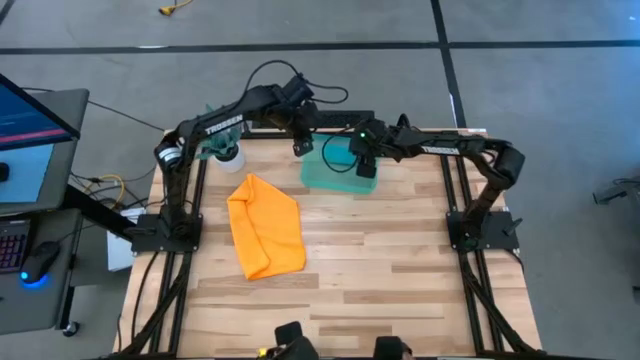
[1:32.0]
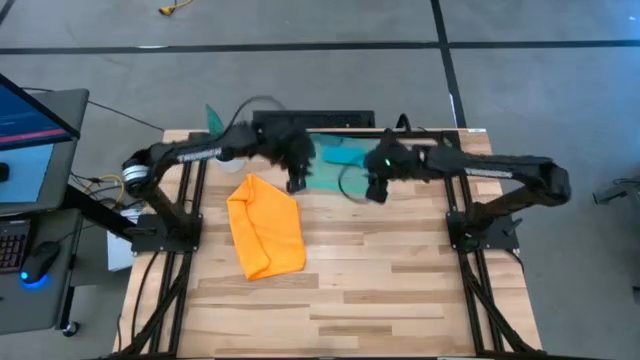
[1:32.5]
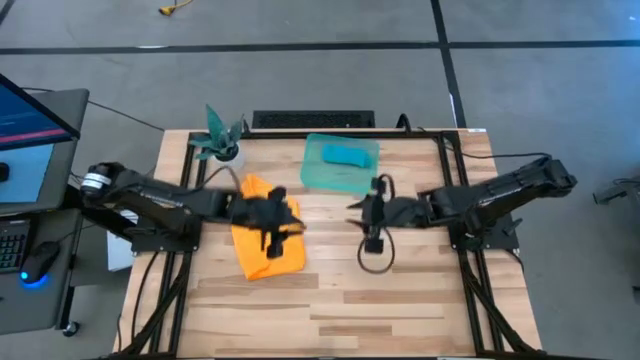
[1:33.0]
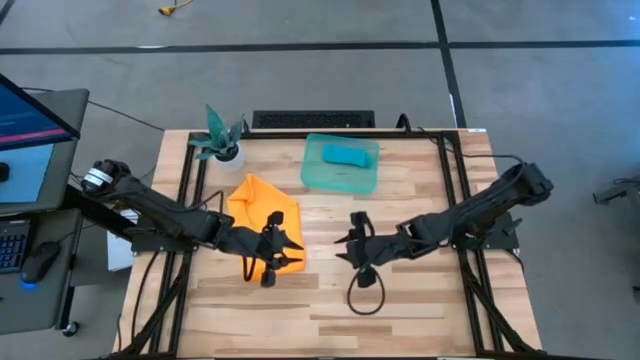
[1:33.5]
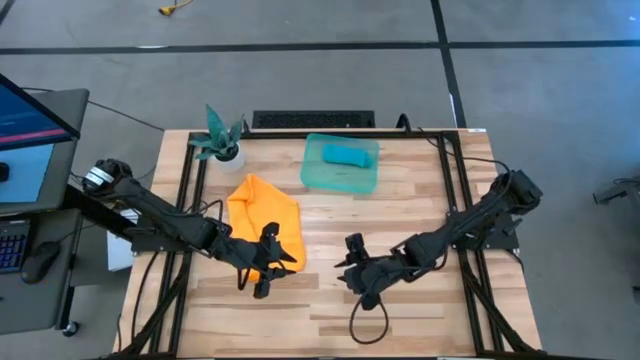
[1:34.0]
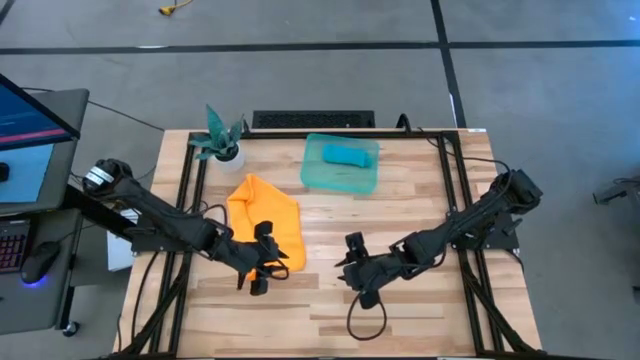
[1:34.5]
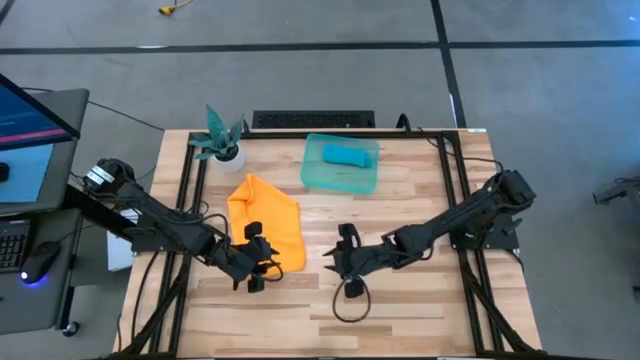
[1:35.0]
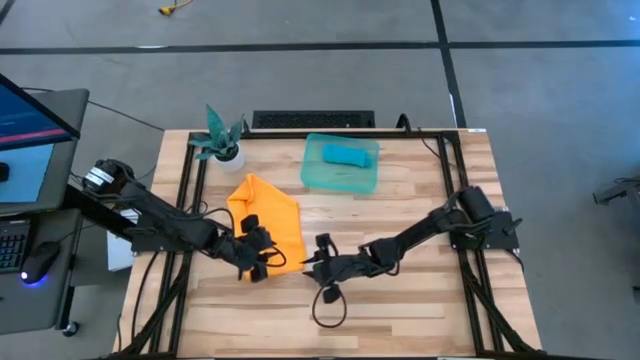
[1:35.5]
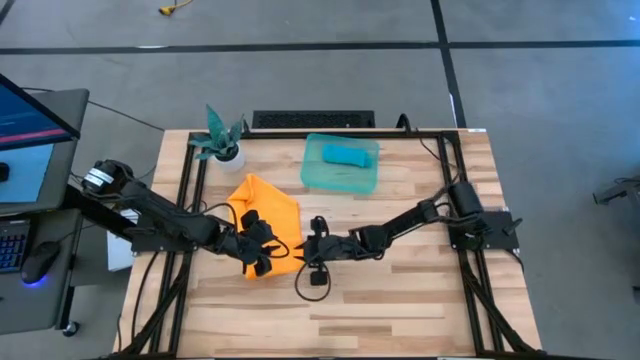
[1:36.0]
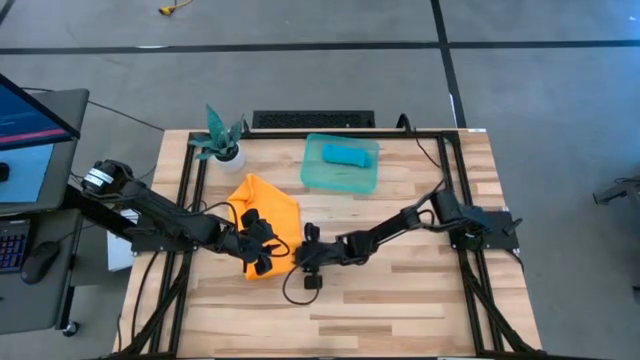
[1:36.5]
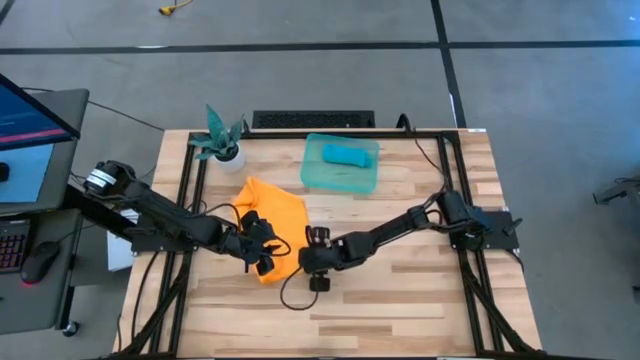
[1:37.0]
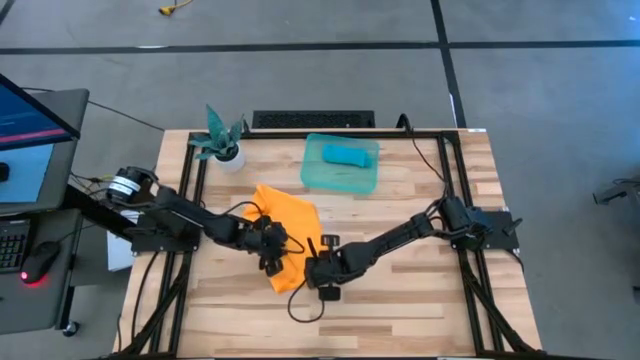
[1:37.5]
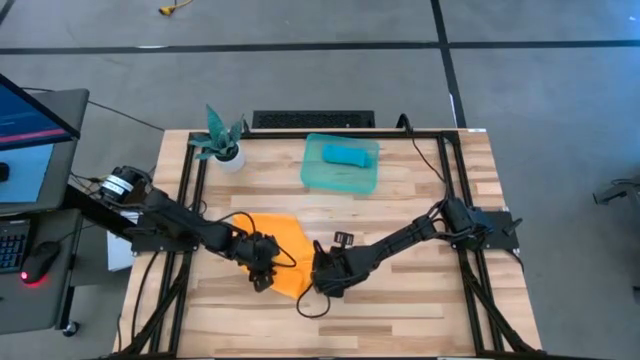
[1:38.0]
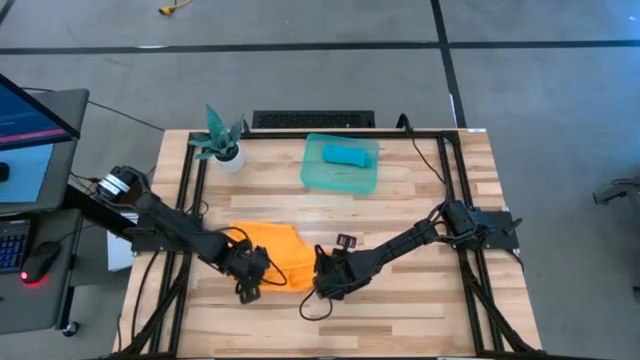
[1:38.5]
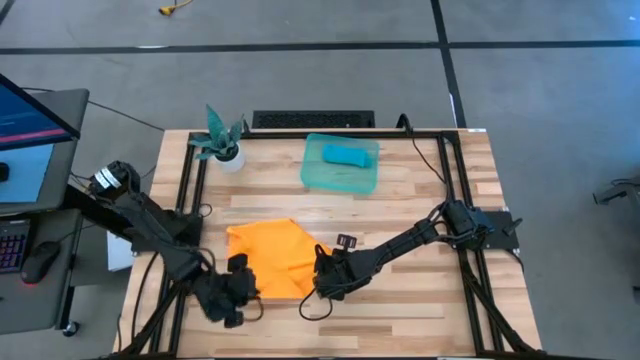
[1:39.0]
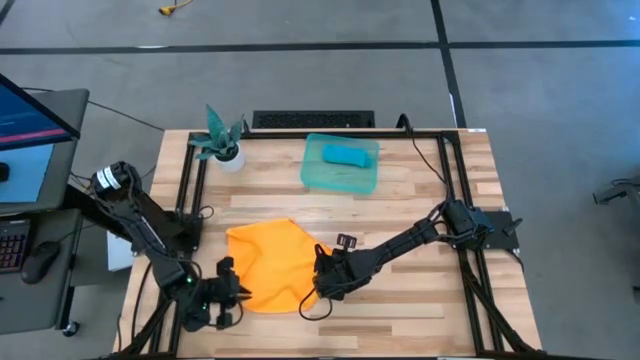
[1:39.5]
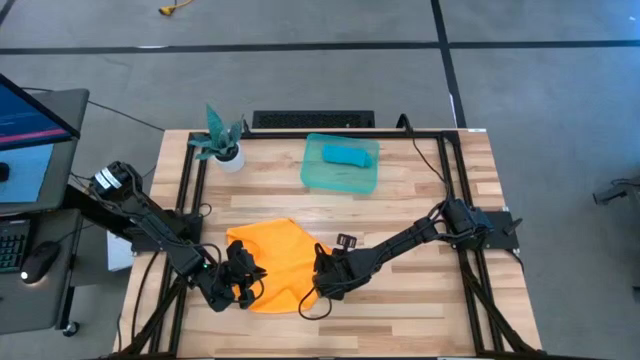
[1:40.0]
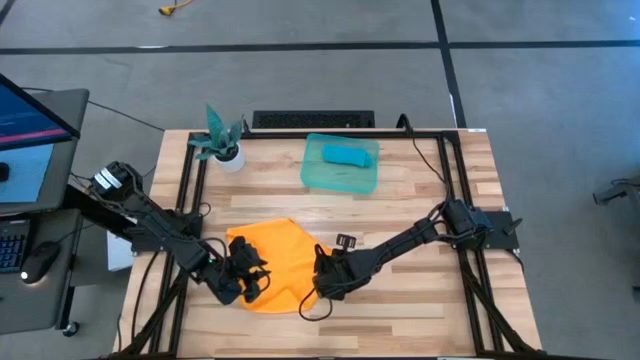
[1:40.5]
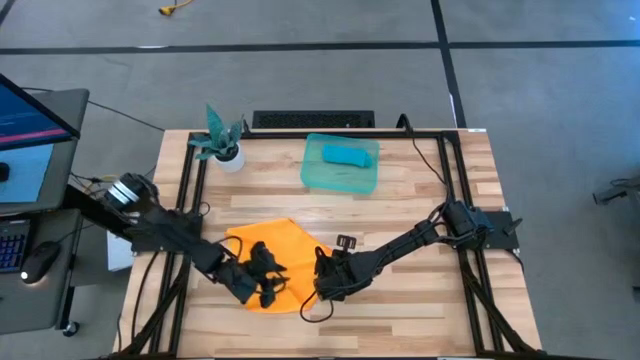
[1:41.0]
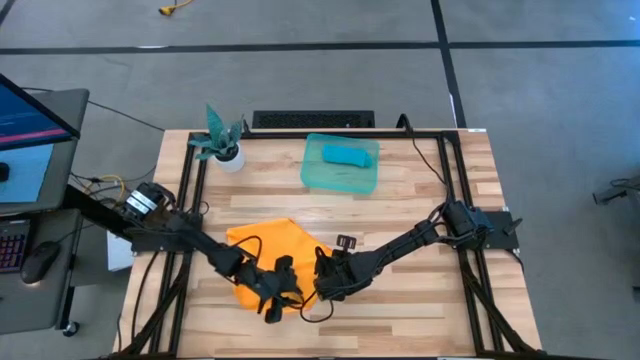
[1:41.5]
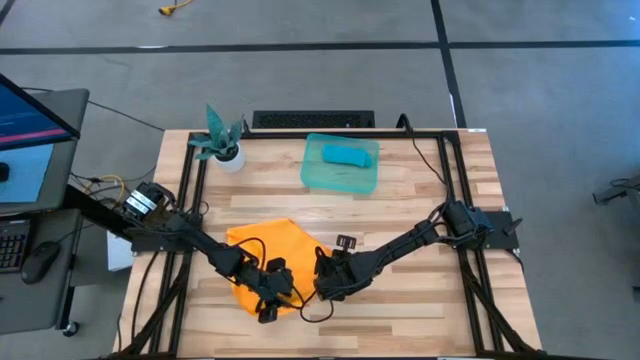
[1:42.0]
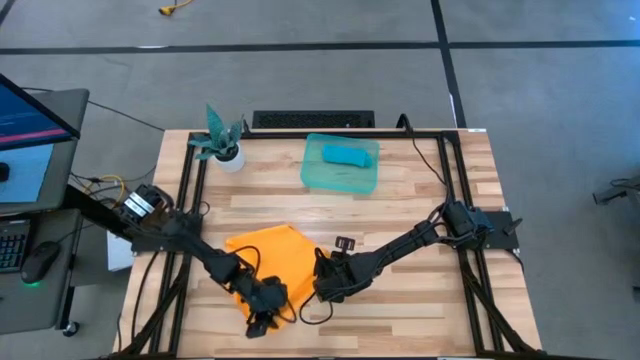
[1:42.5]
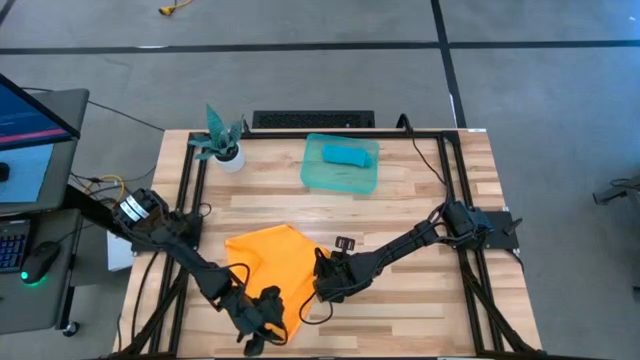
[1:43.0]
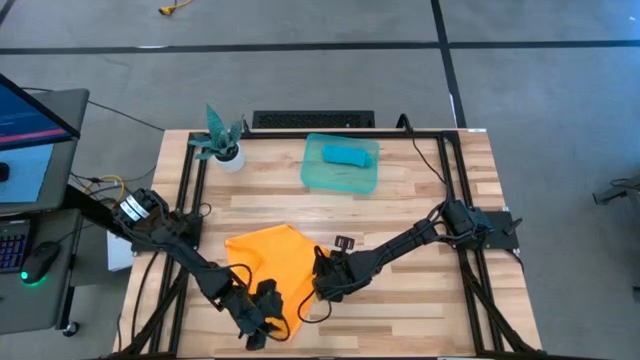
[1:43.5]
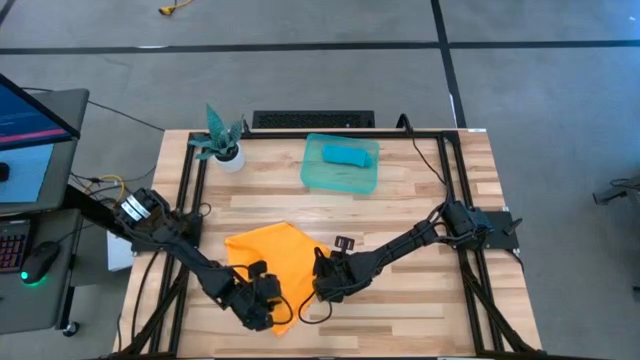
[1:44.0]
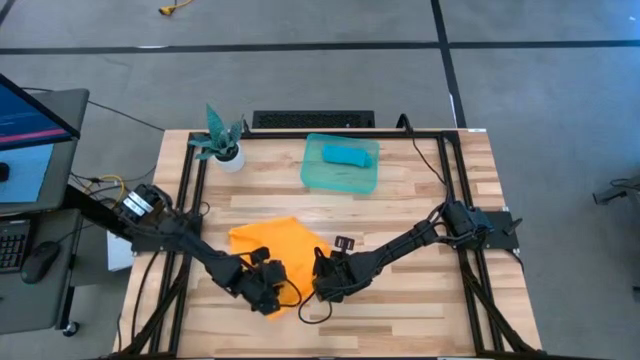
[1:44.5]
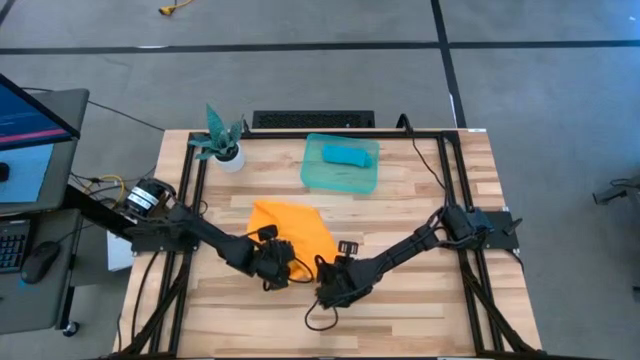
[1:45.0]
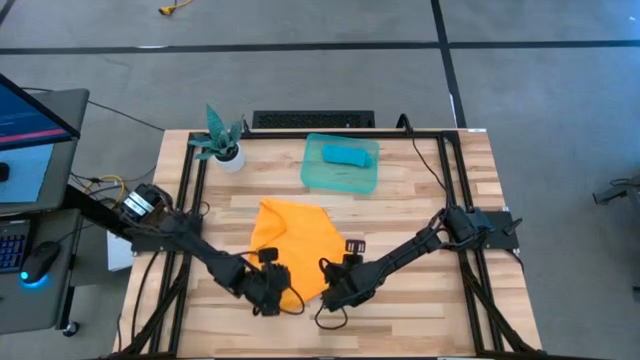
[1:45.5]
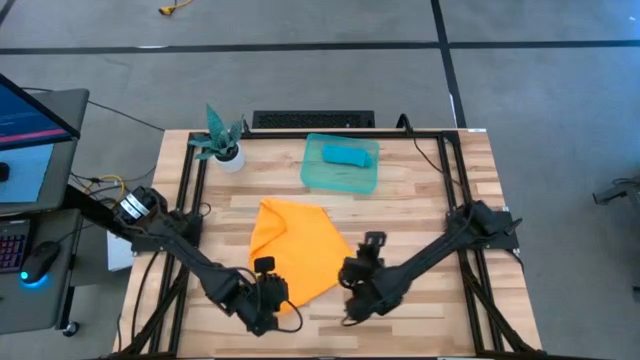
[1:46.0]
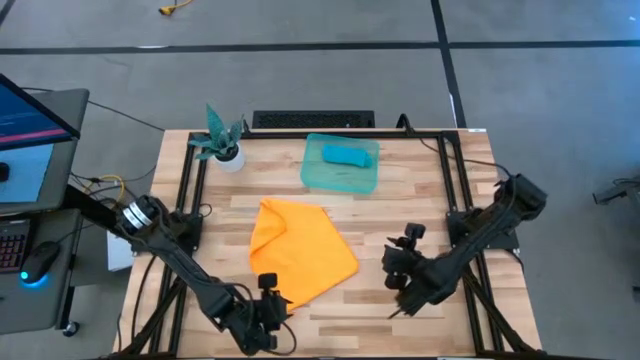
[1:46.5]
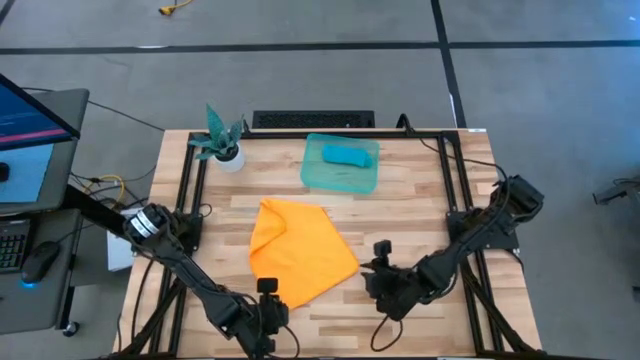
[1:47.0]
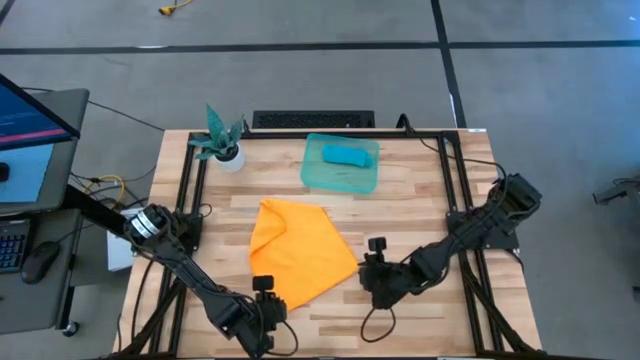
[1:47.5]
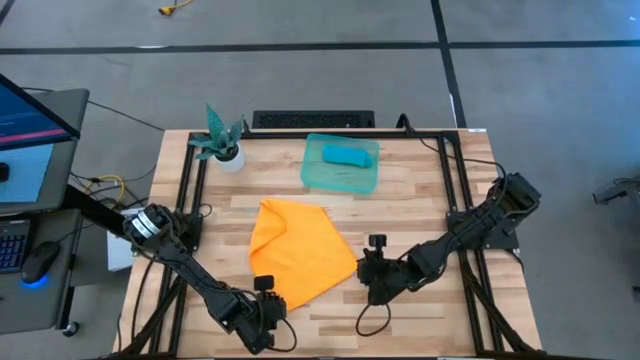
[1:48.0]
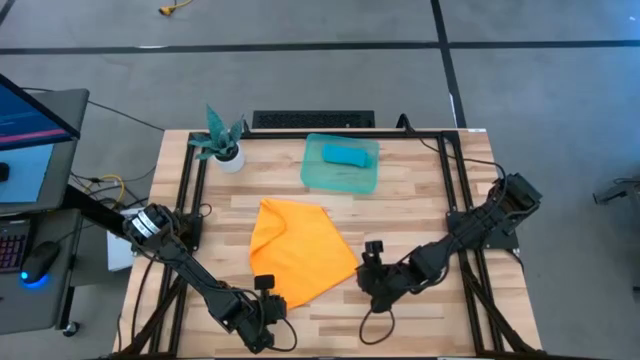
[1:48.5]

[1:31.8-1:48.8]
Task: Roll microfiber towels into tight, uniform cylinder then place into a basket
Fold the yellow microfiber towel

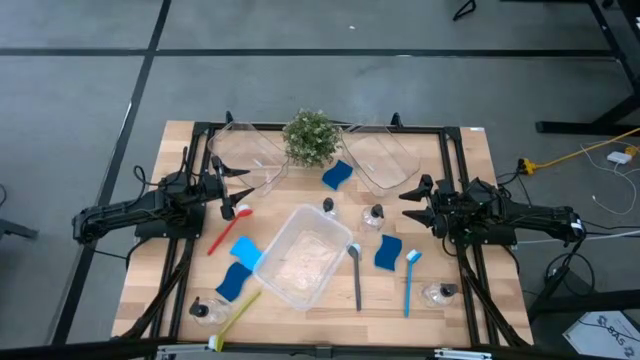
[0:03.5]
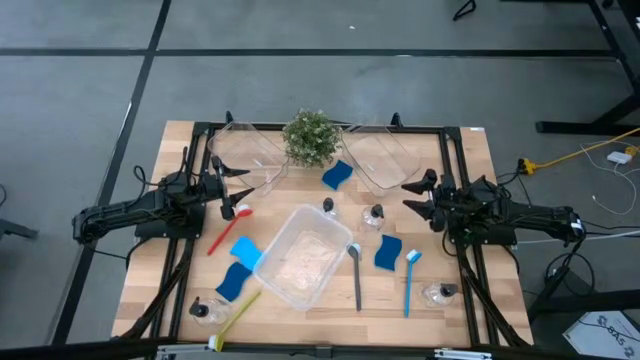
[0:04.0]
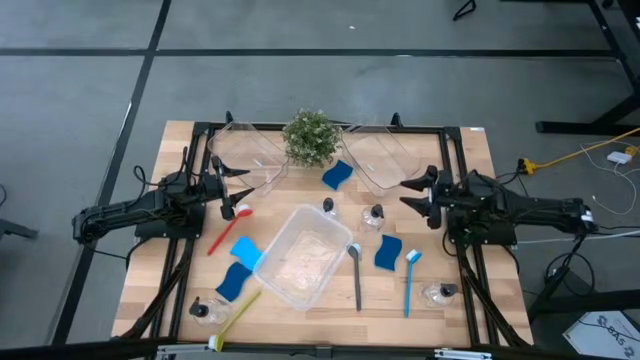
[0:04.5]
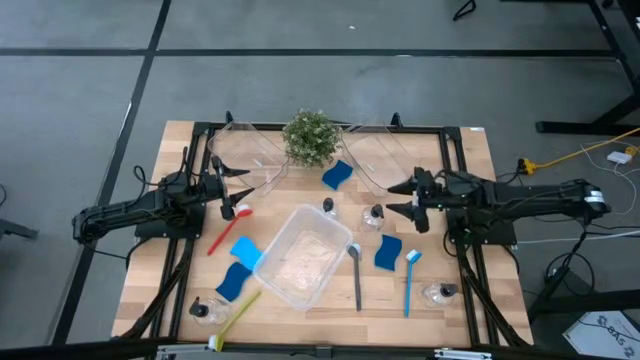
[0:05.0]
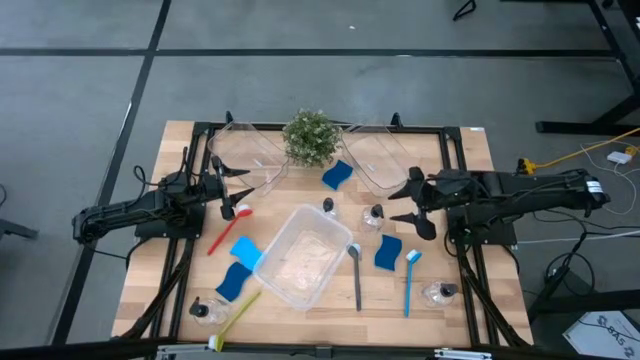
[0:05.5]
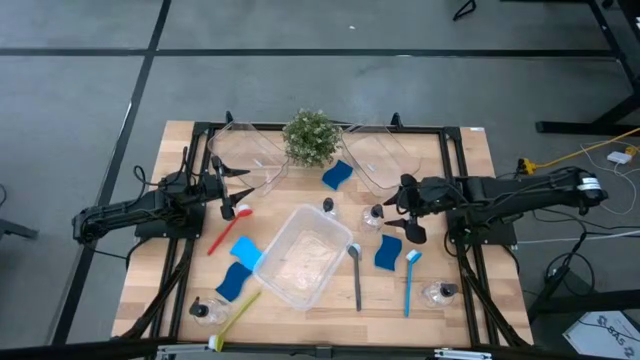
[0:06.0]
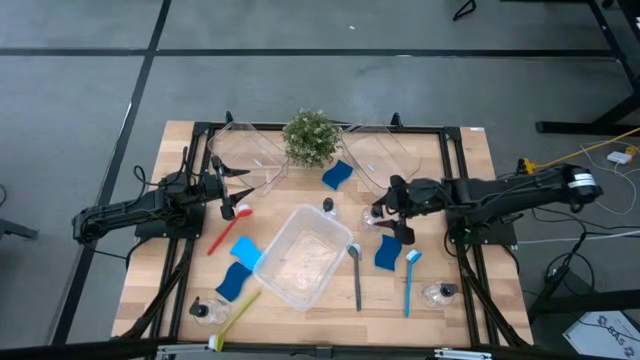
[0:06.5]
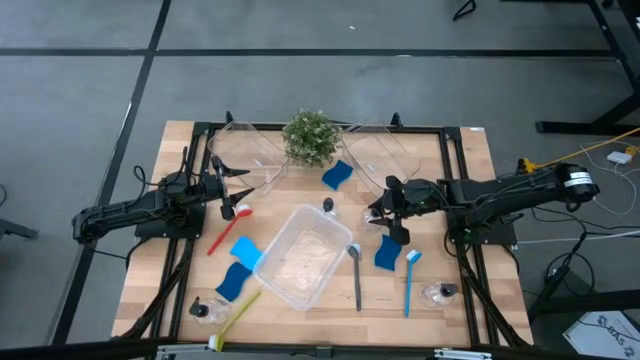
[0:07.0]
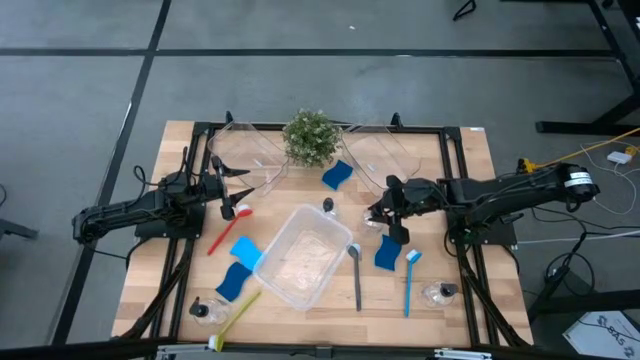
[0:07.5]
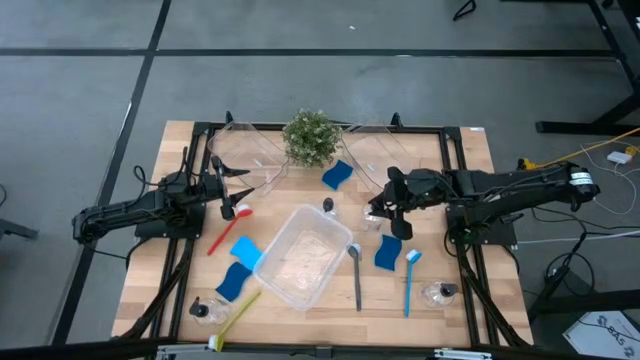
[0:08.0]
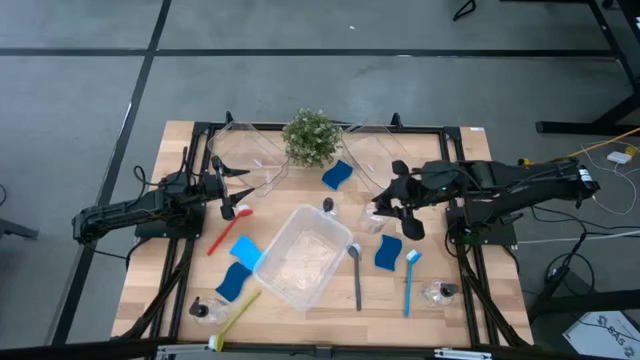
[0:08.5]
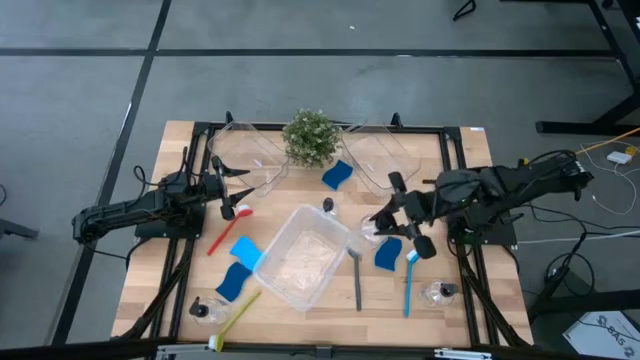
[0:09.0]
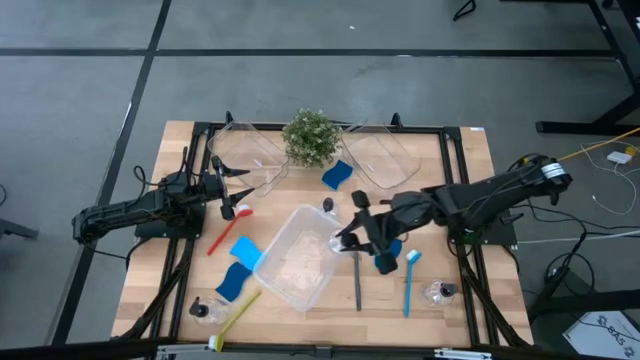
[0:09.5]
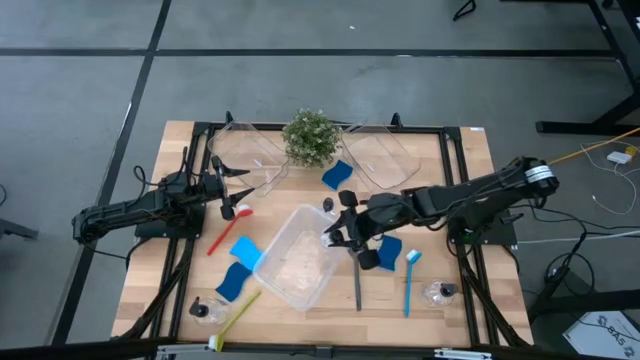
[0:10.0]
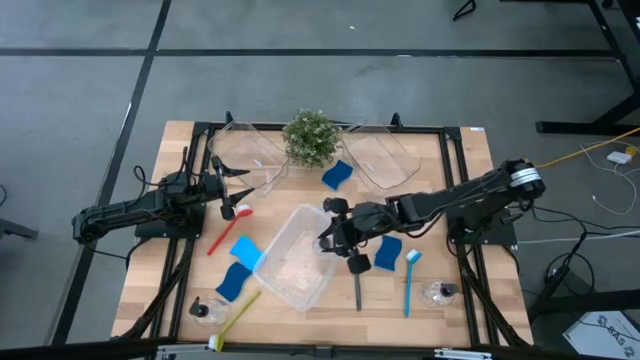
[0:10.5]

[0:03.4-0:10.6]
Task: Pick & Place Kitchen Sink Supplies
Put the liquid dispenser bottle into the white bin
